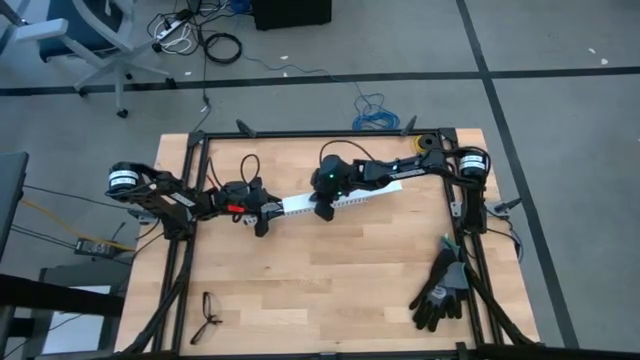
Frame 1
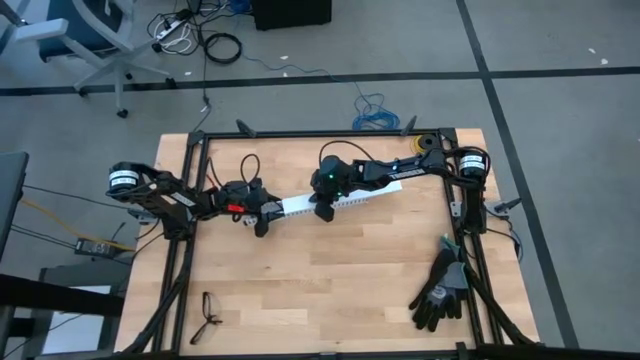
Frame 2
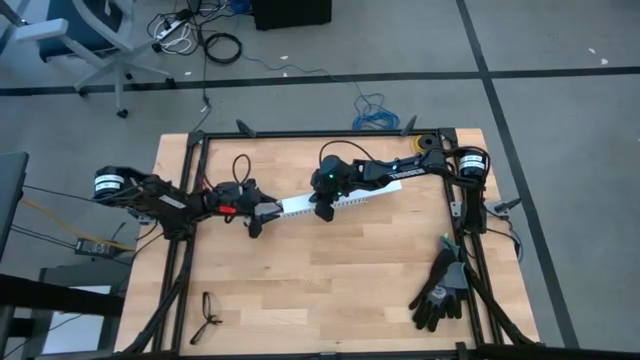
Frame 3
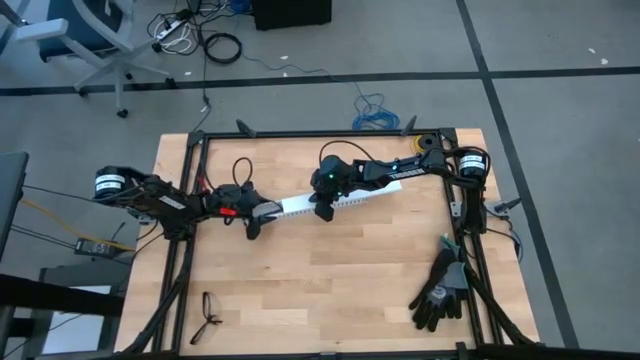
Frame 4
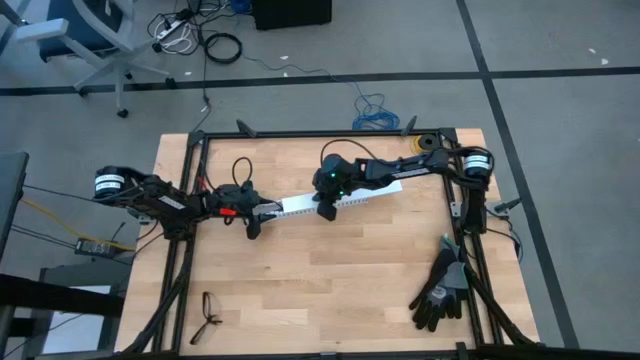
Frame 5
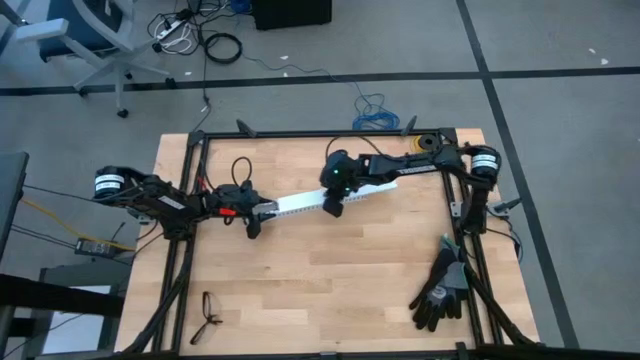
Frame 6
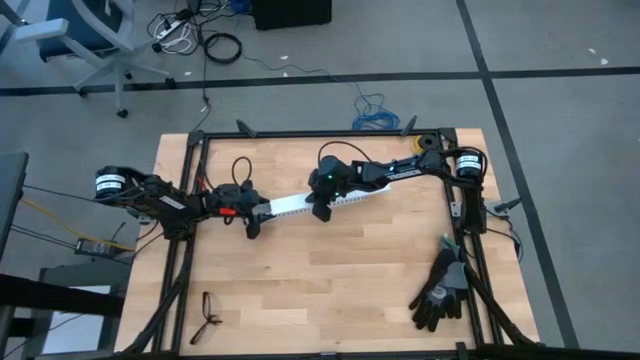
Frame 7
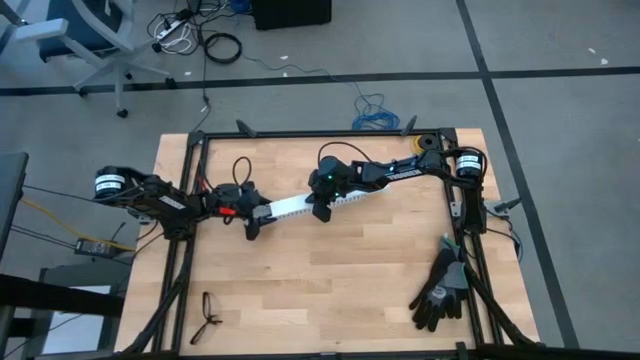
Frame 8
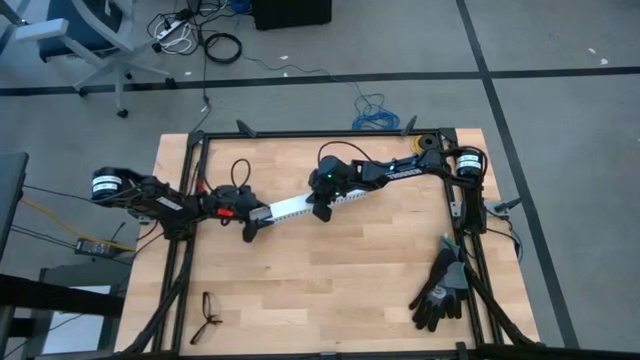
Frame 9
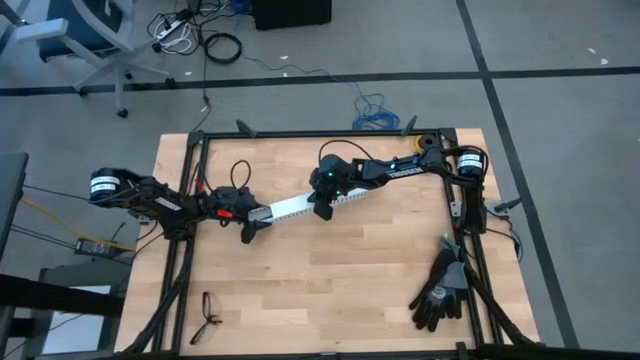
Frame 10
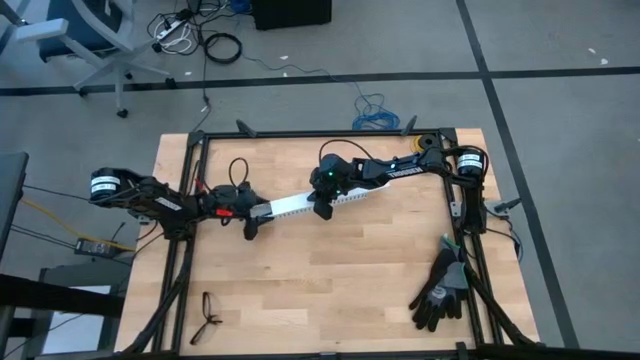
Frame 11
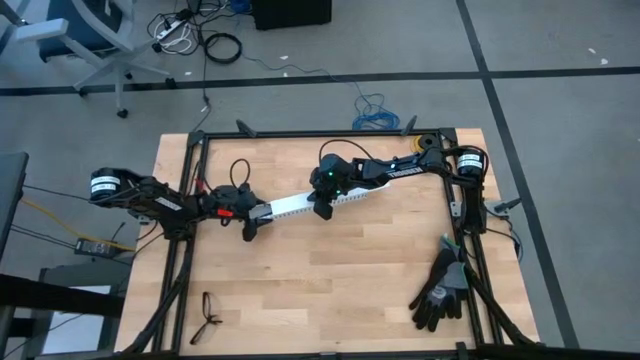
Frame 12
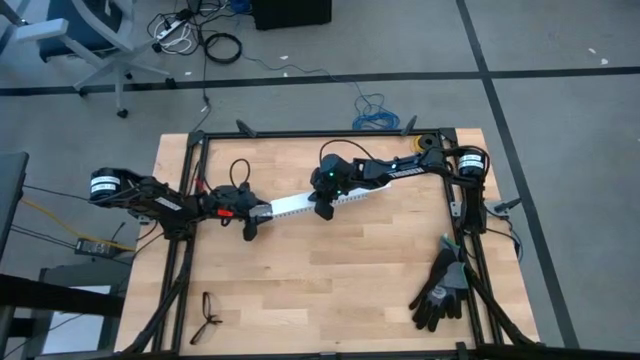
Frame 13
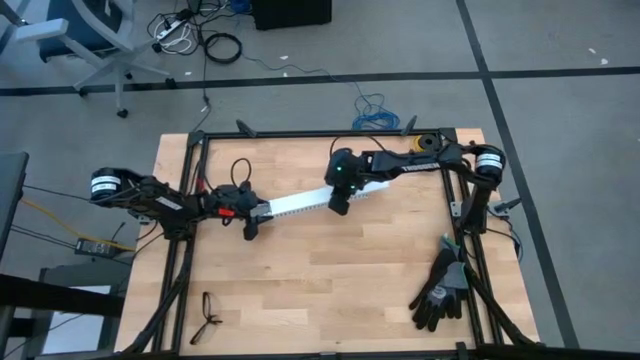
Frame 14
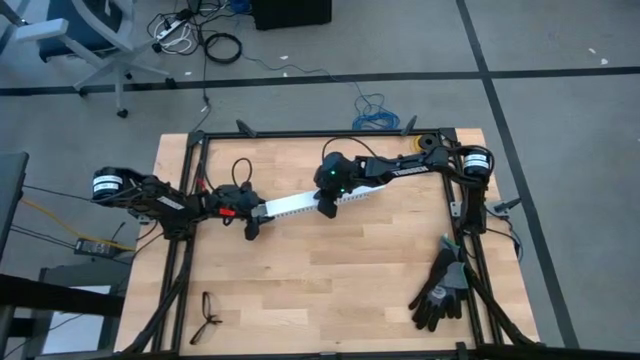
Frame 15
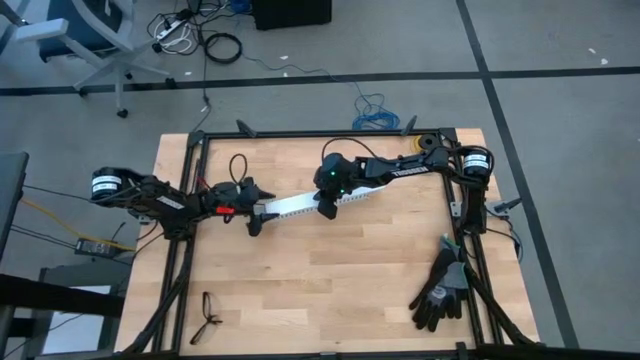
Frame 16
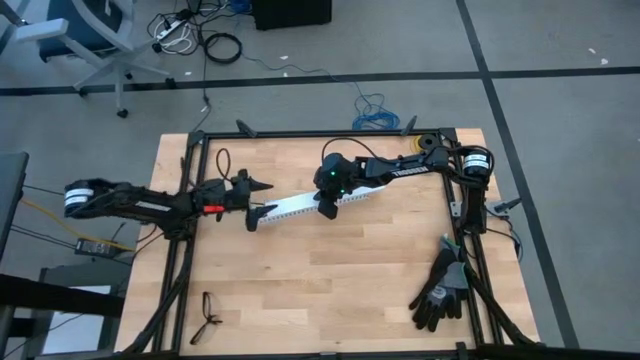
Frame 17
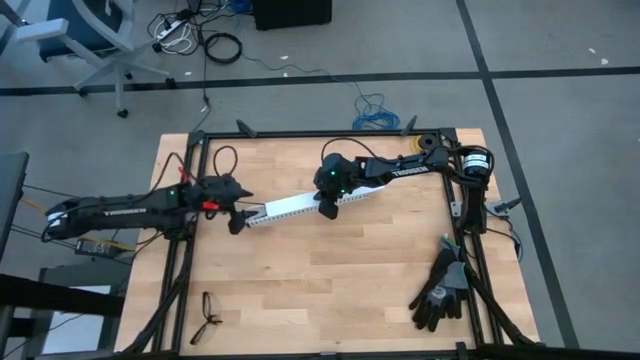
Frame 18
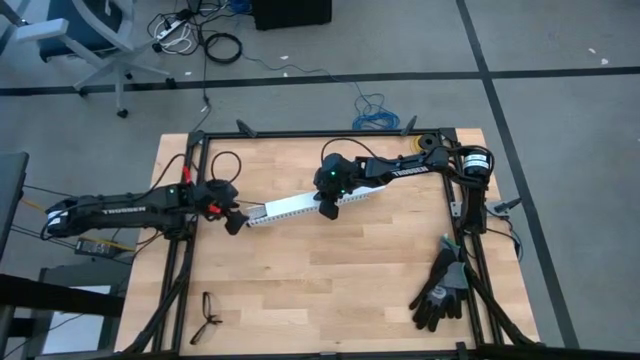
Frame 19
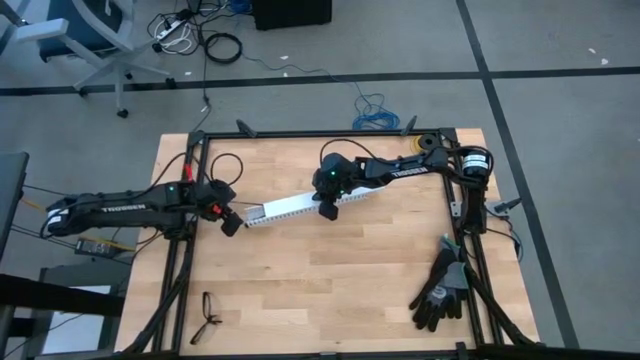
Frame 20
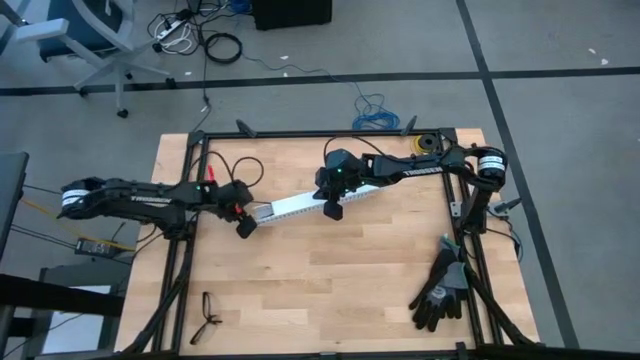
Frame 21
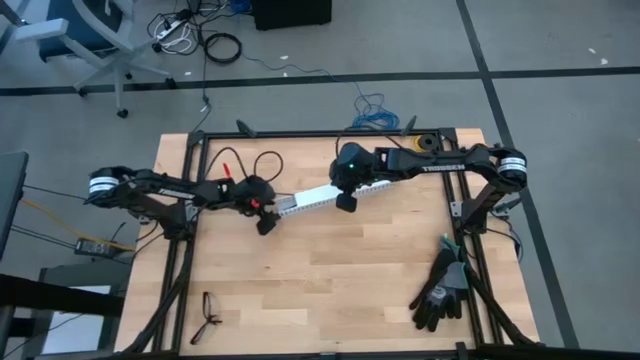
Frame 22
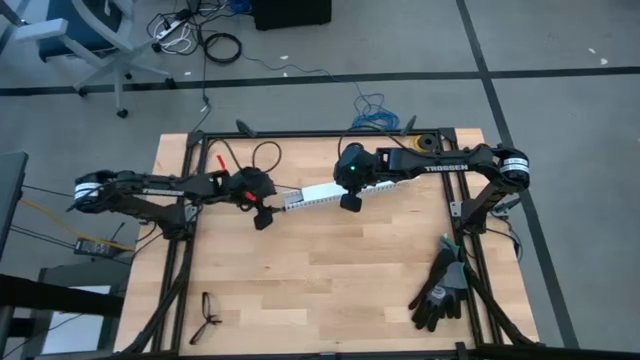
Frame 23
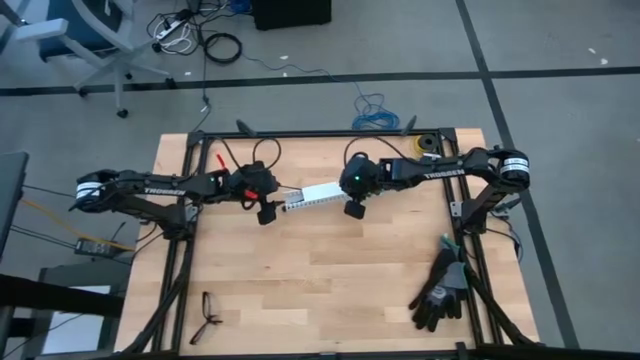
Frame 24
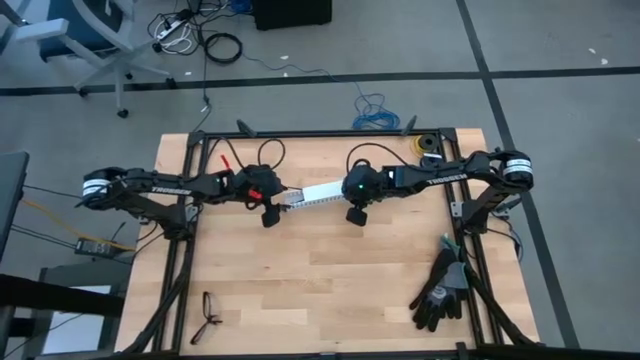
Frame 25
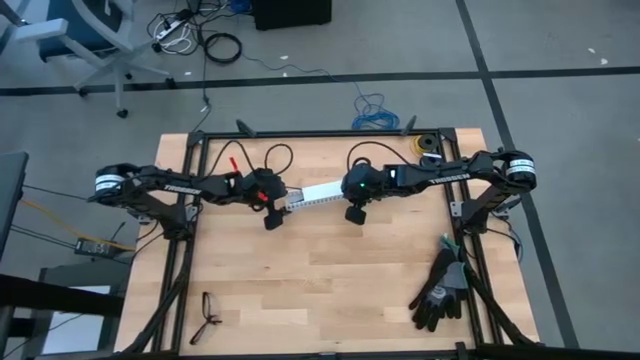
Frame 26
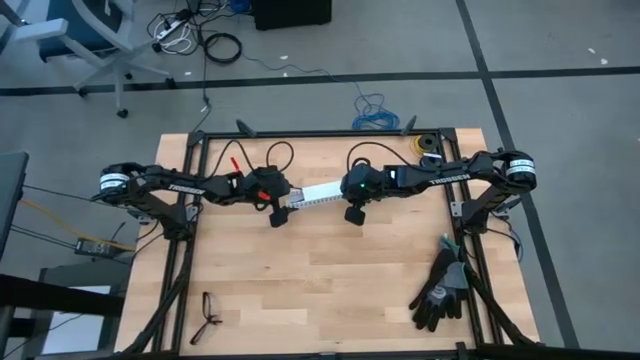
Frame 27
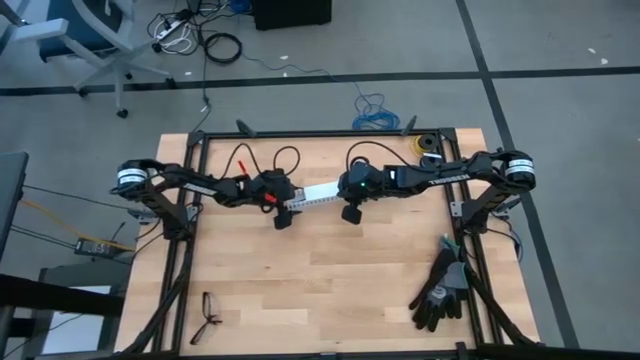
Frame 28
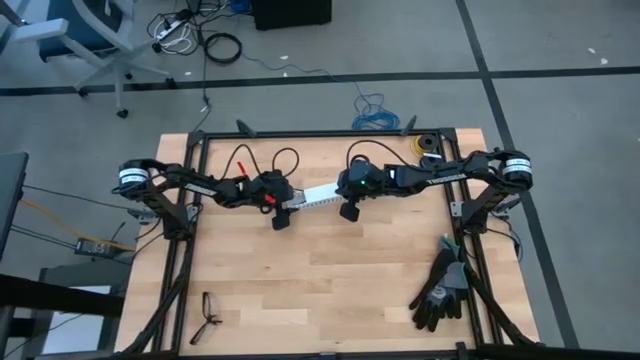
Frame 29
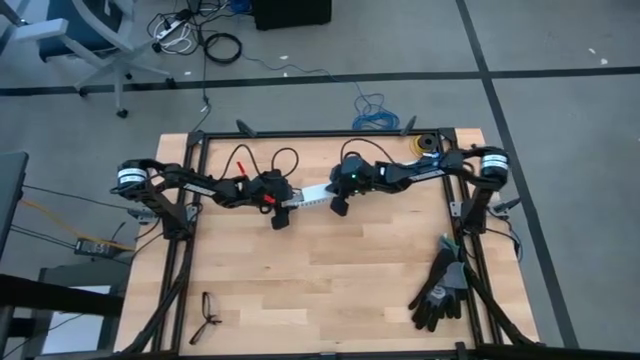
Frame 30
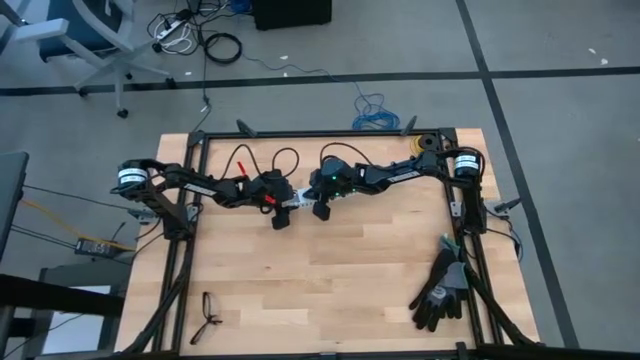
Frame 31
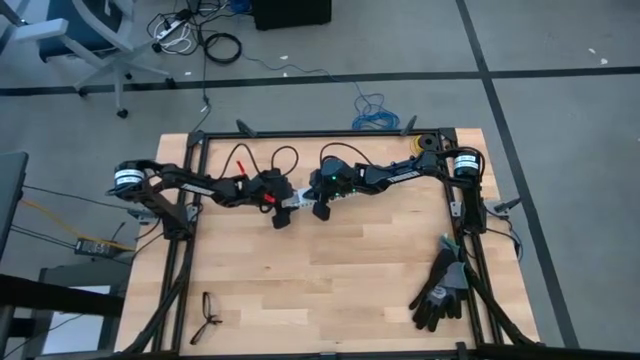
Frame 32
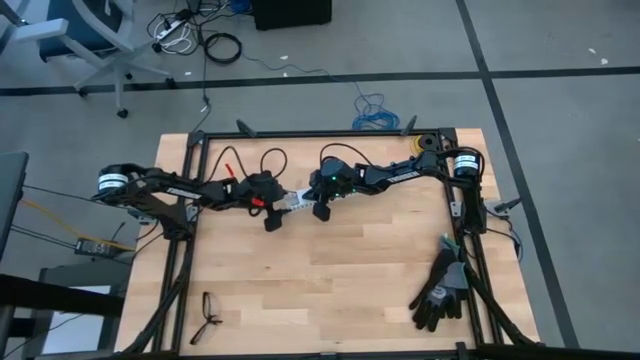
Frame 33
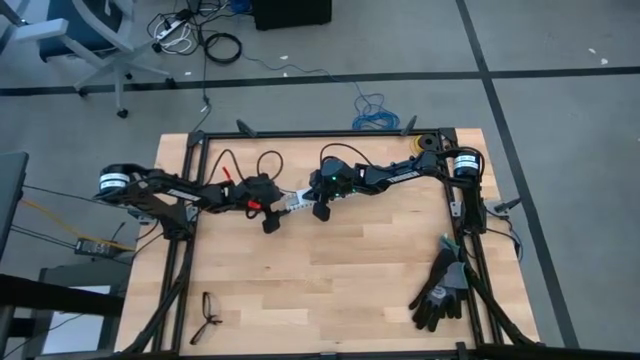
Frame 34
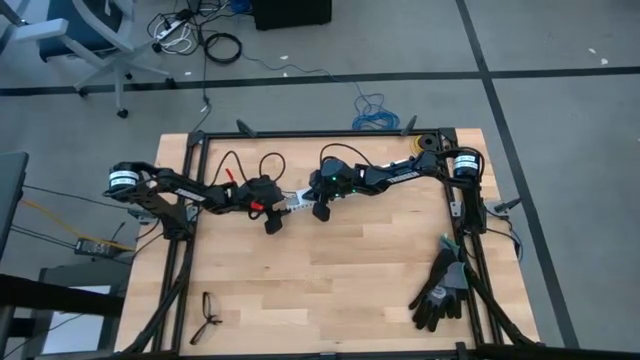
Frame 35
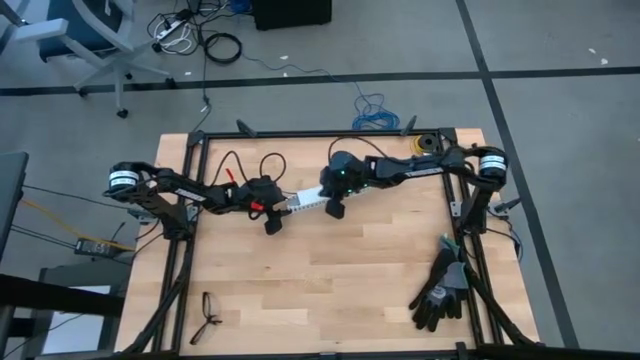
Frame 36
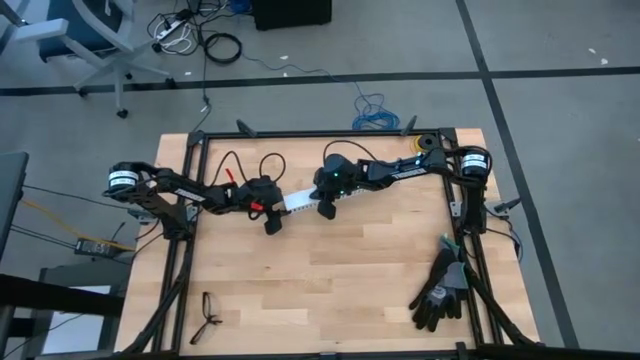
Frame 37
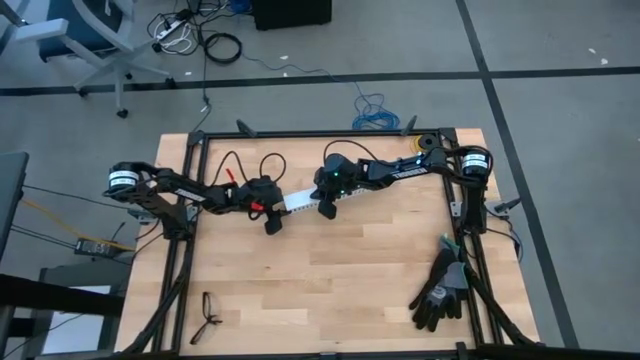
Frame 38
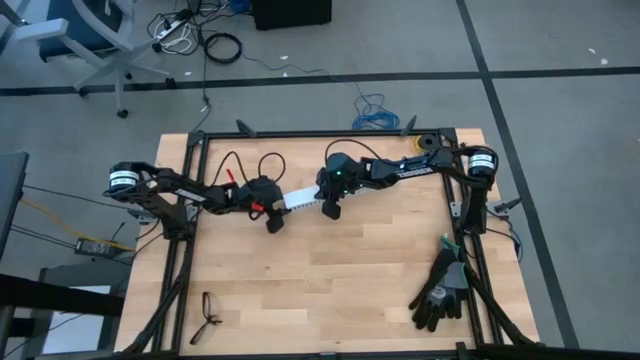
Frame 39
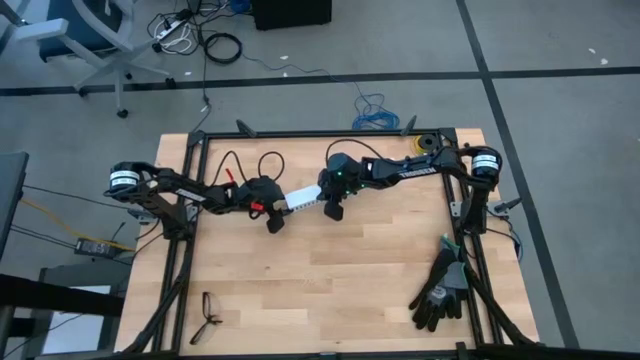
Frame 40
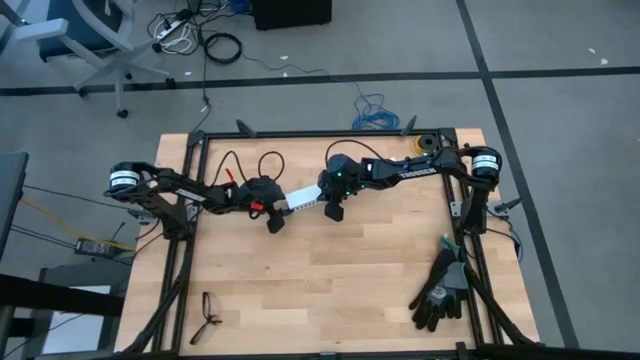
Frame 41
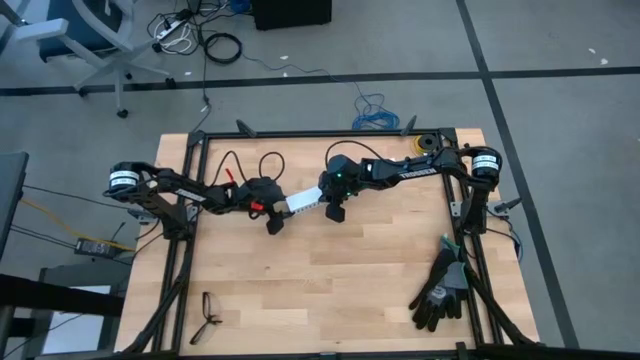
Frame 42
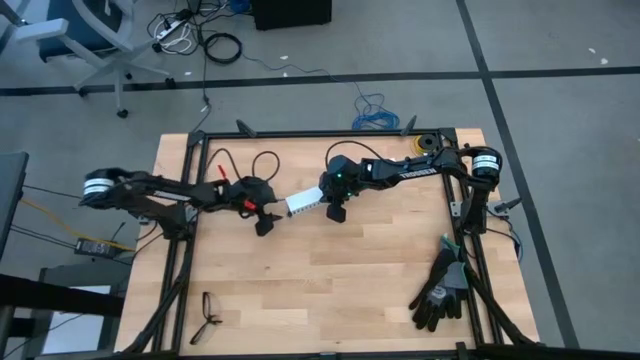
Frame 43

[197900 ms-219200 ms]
Task: Ziptie cables
Close the white cable duct with the white cable duct cover
